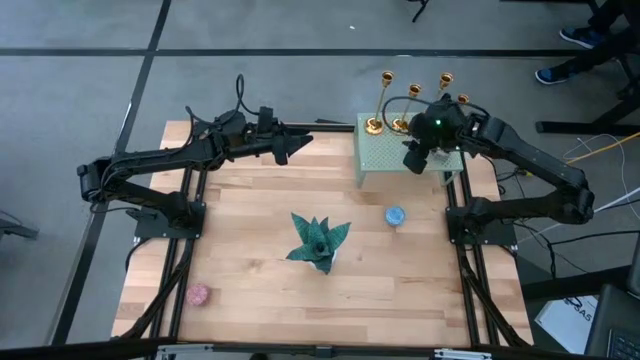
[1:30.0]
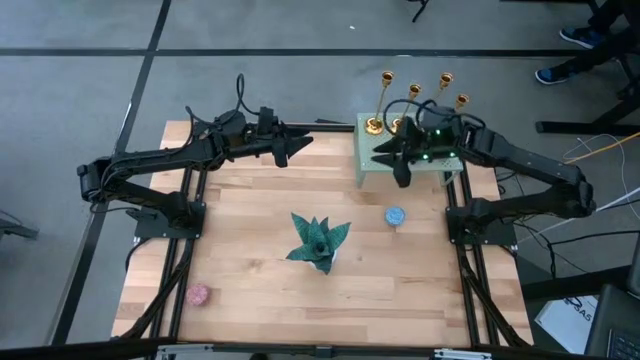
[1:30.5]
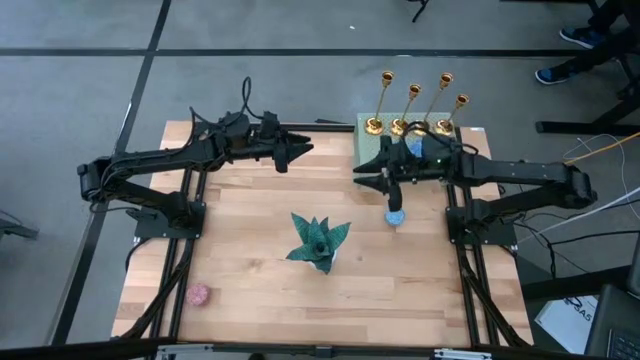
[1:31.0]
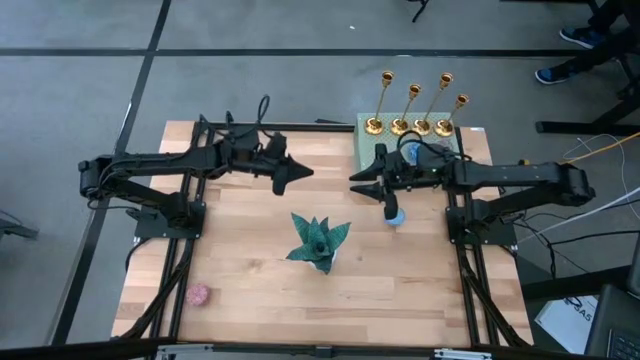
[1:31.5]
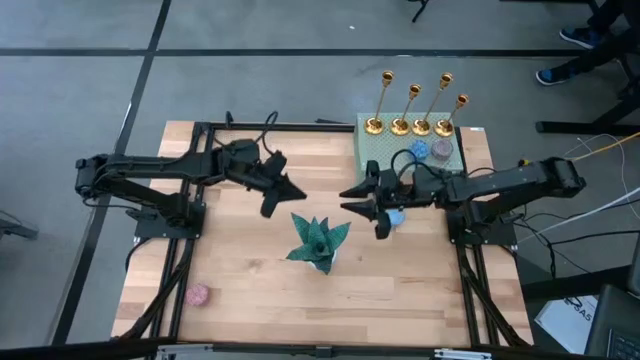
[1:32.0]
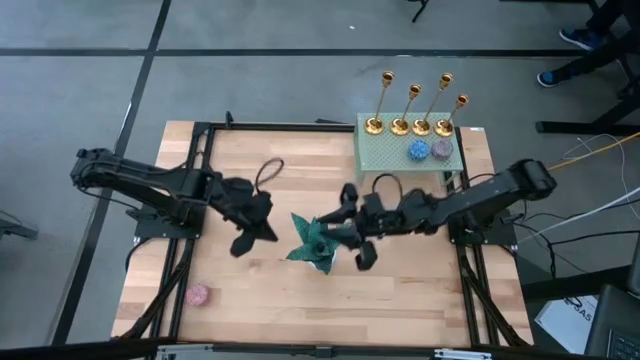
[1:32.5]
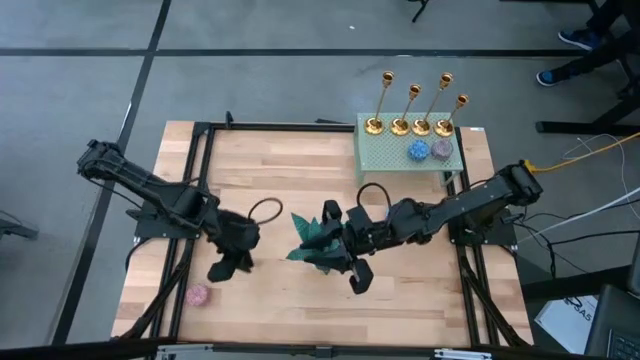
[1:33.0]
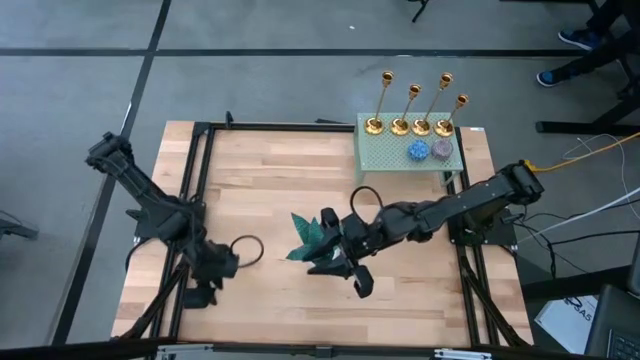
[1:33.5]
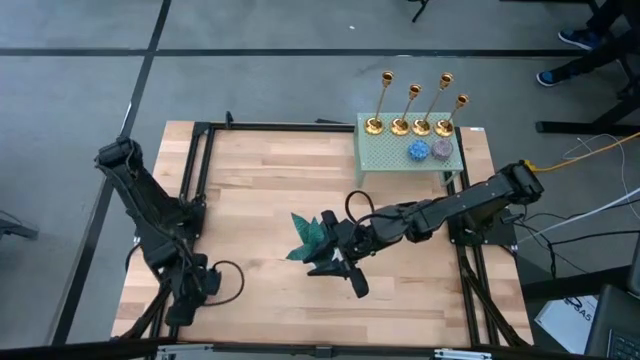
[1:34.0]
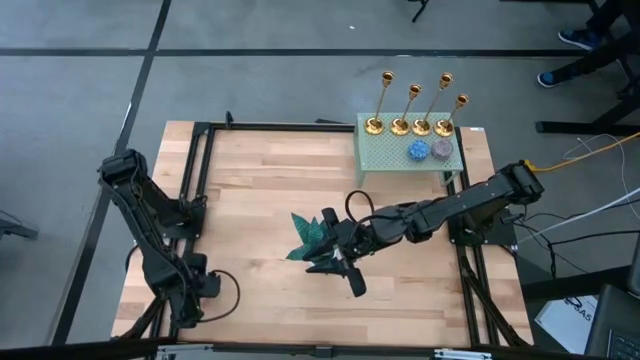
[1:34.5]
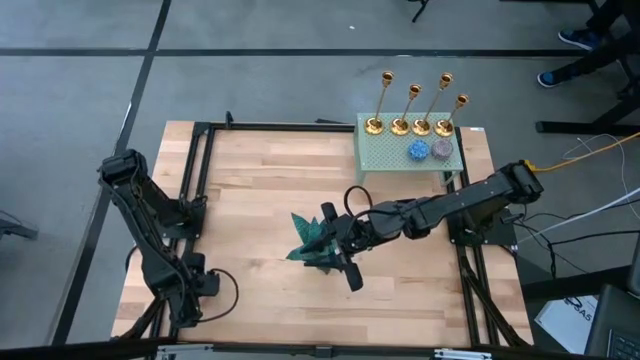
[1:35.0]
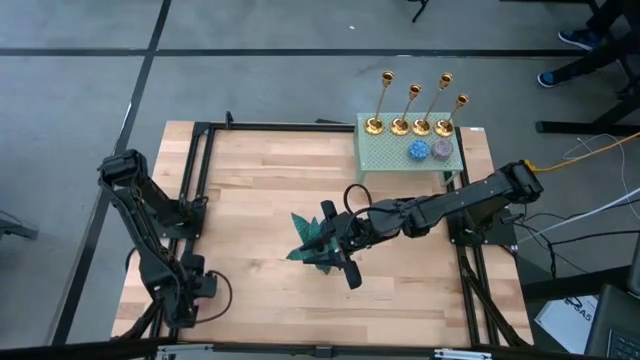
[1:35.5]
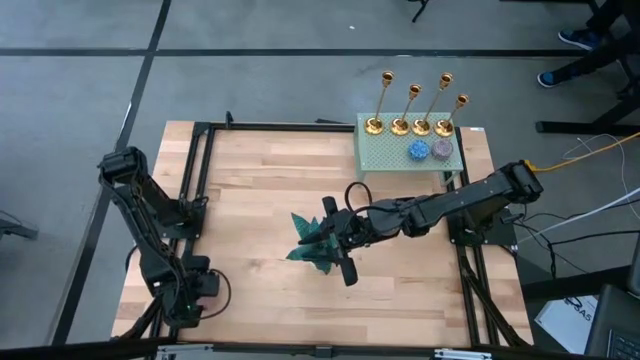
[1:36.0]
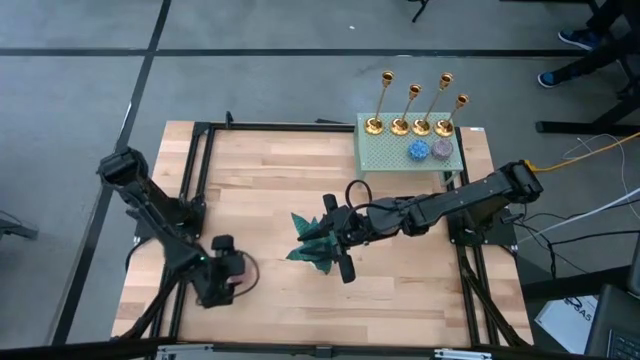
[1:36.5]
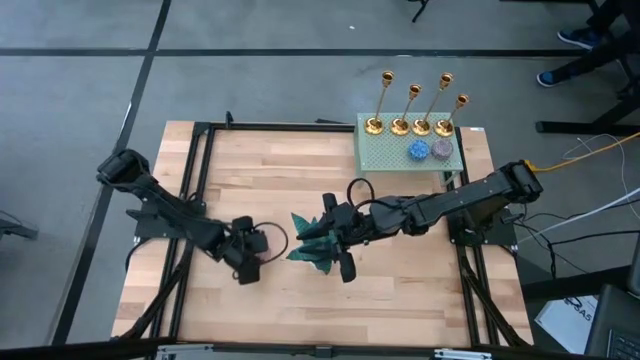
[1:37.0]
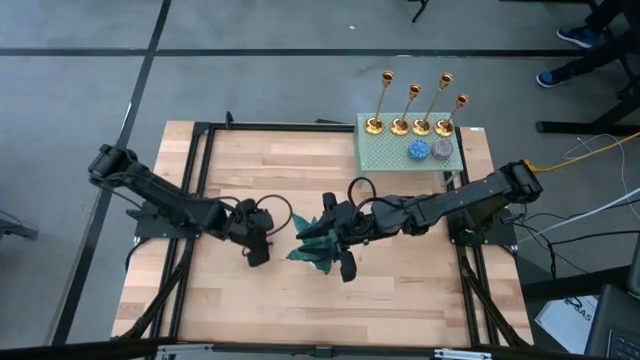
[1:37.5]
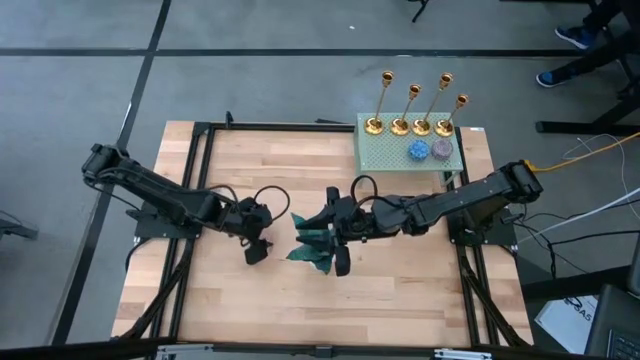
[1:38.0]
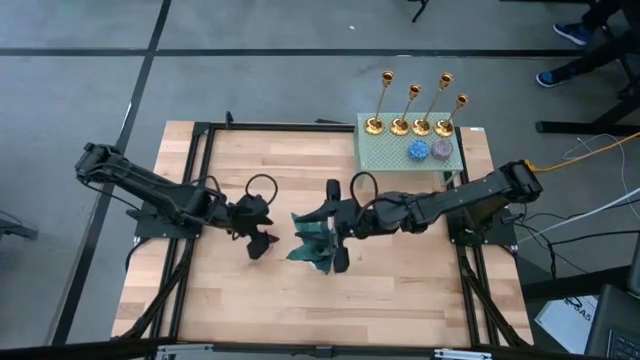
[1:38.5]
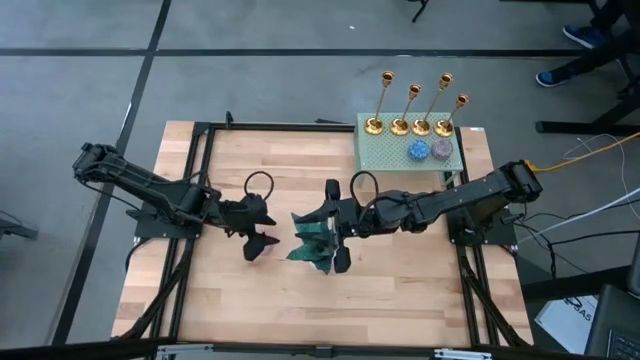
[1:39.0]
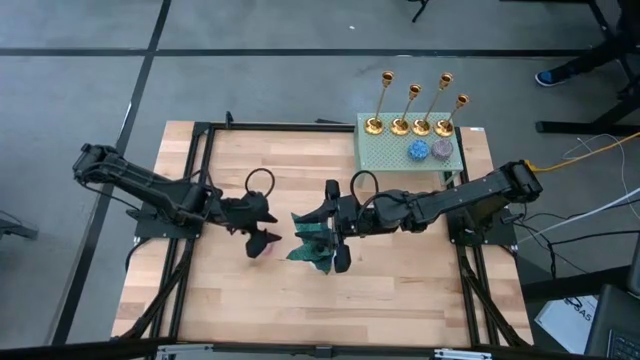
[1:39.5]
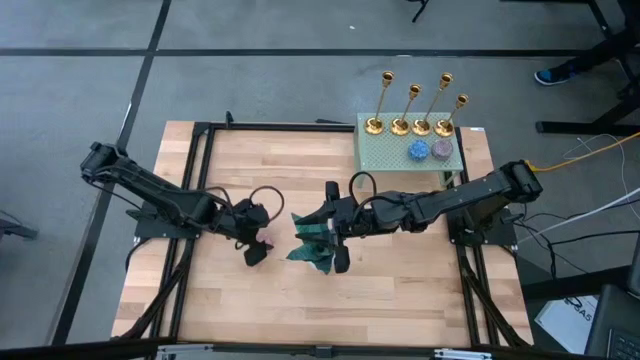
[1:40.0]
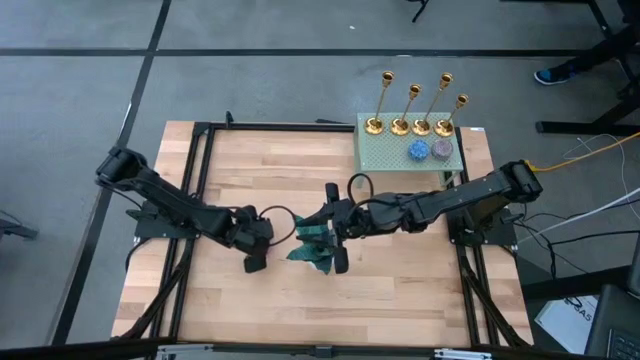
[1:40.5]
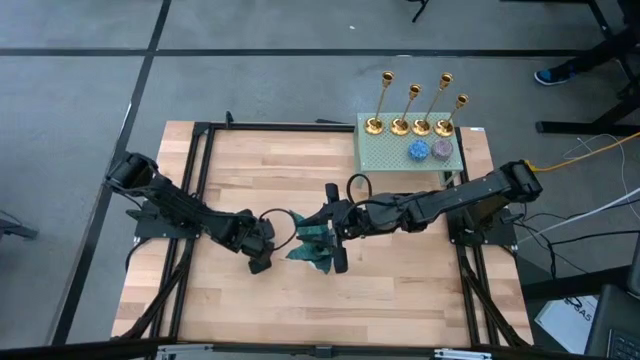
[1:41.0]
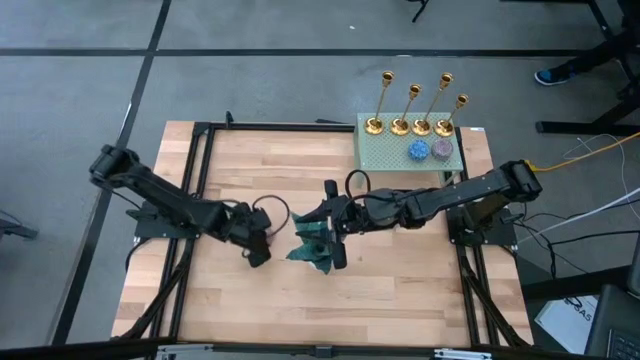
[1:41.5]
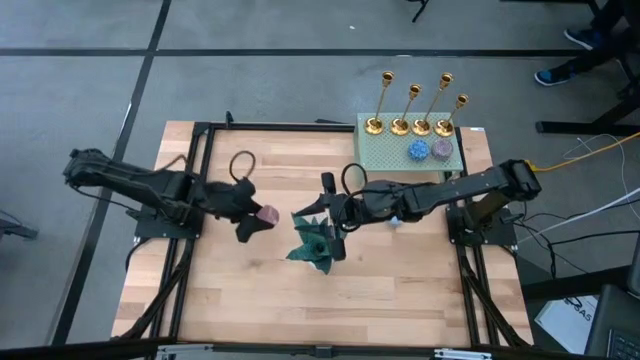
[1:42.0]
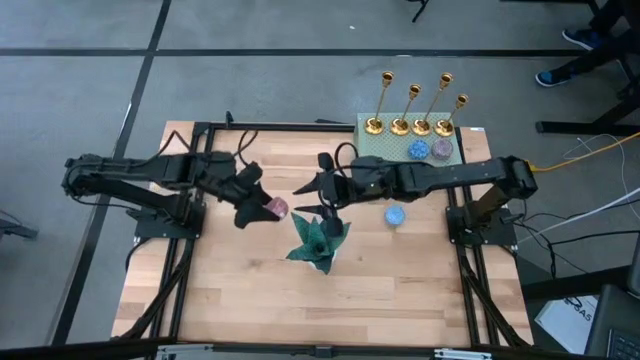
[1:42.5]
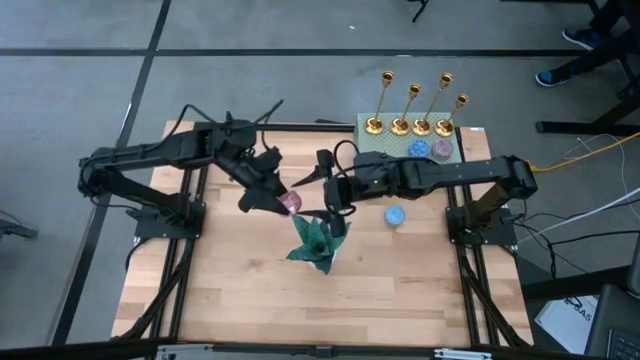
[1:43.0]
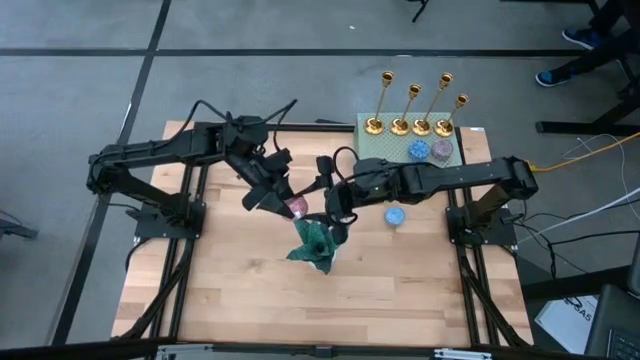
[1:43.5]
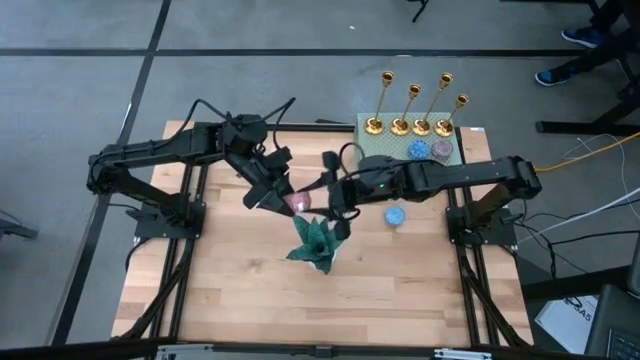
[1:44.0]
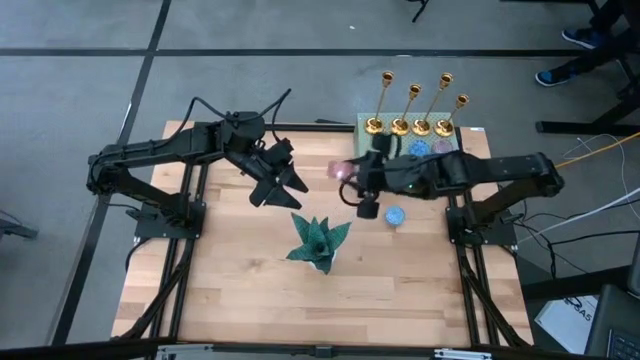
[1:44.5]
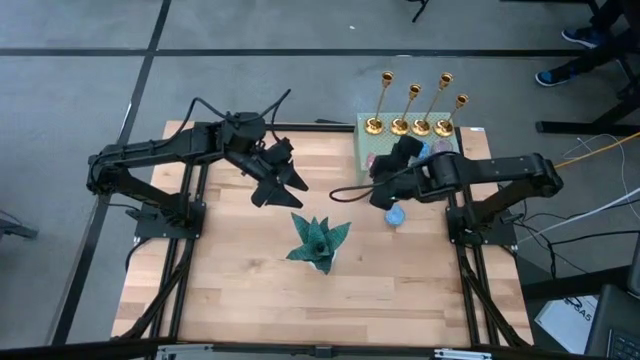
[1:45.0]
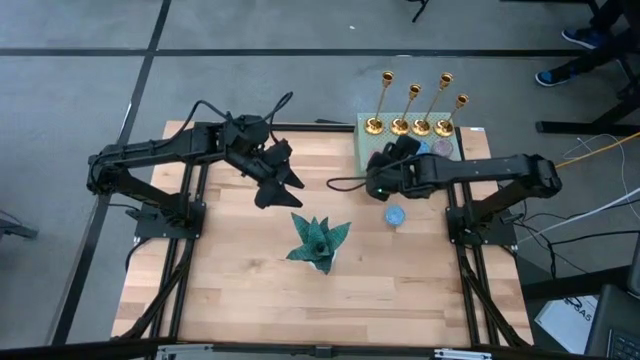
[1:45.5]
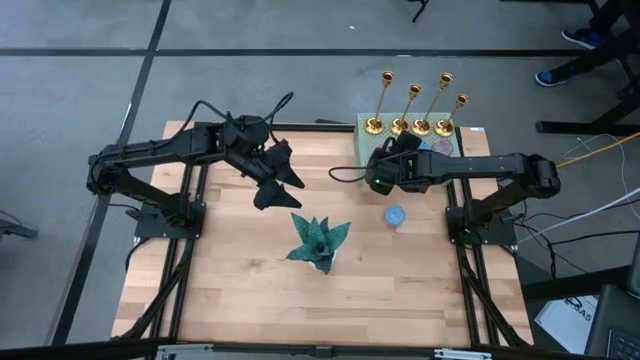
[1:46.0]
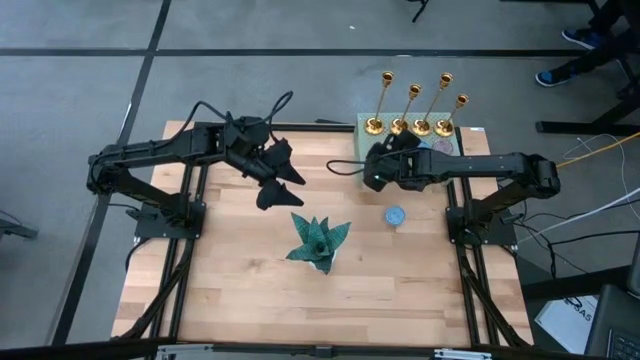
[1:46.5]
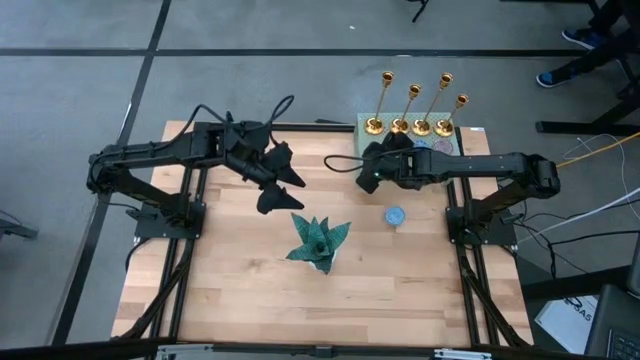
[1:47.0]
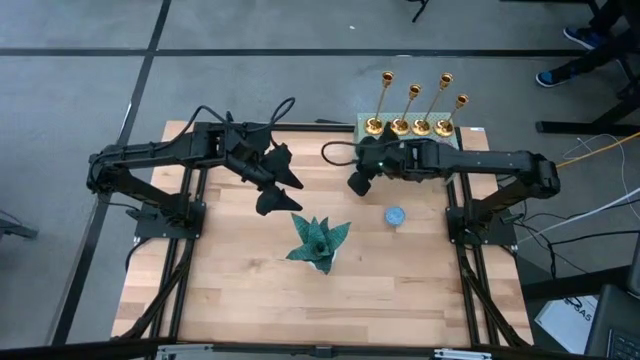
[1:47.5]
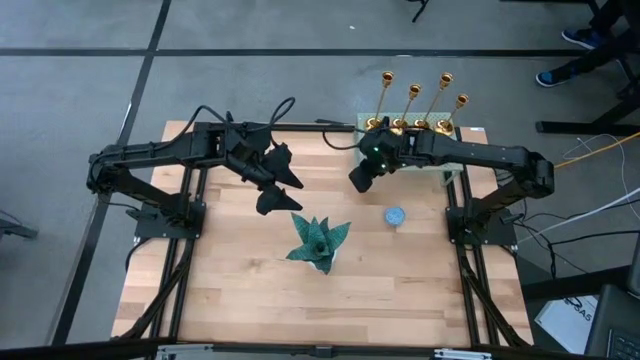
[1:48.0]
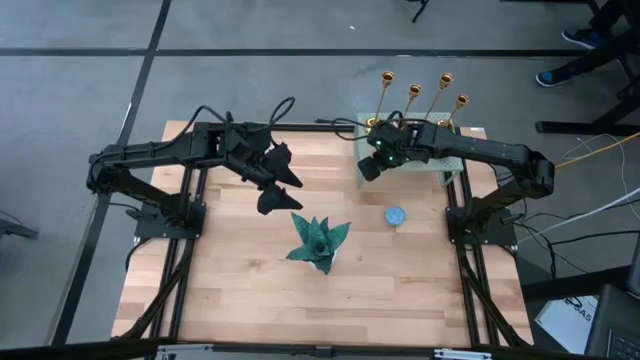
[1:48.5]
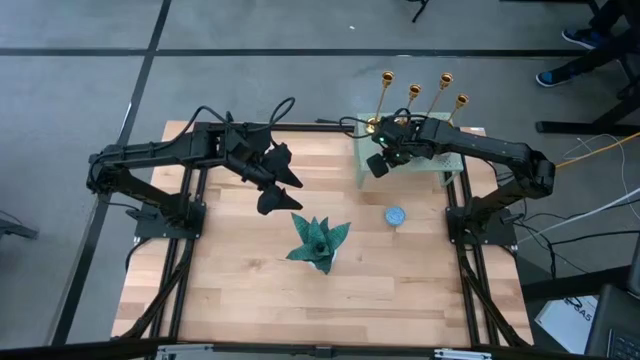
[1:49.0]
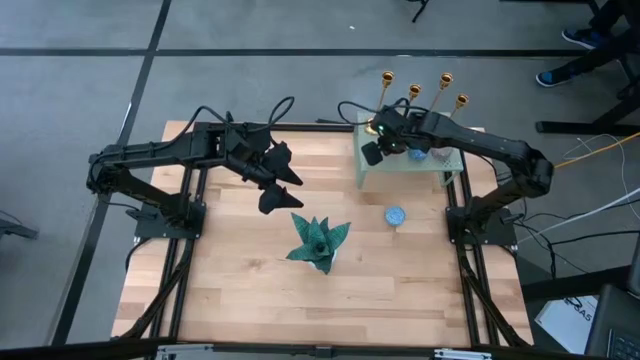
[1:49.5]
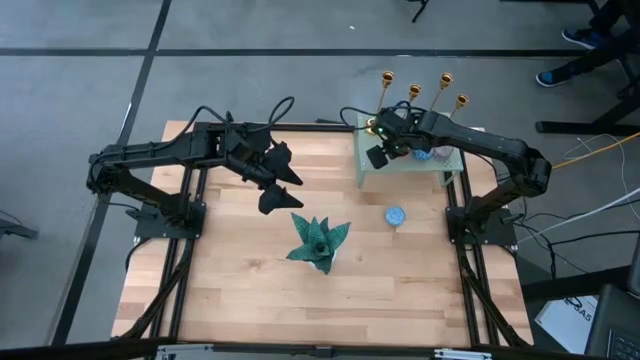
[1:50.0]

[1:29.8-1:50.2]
Task: Stock candles and holders on shelf
Align the pink scented candle with the other scented candle on the shelf
